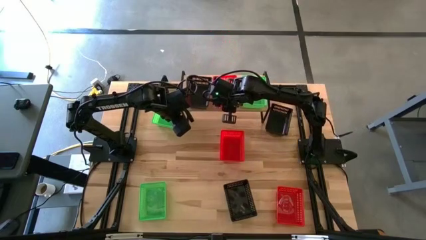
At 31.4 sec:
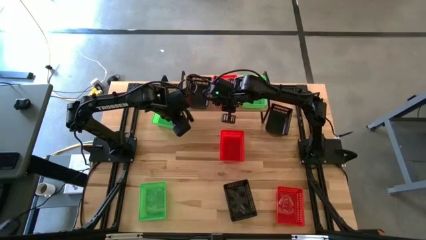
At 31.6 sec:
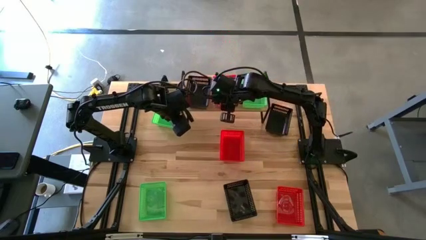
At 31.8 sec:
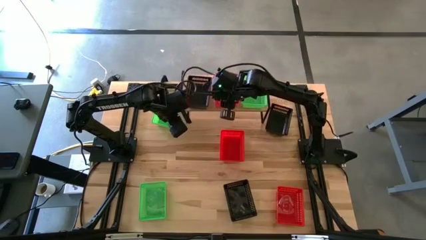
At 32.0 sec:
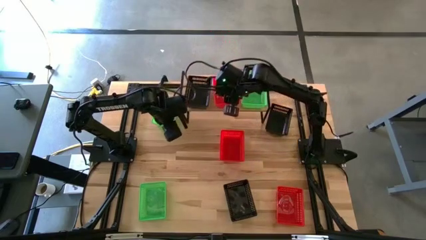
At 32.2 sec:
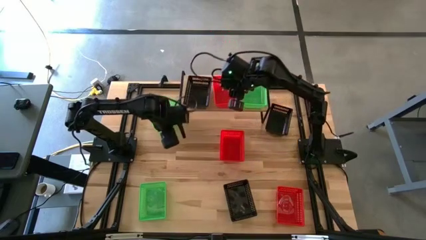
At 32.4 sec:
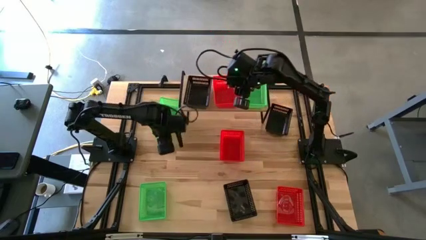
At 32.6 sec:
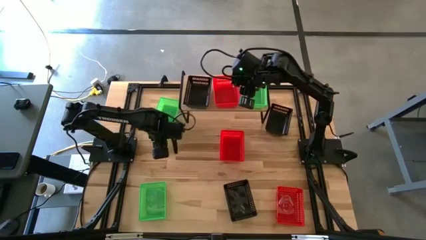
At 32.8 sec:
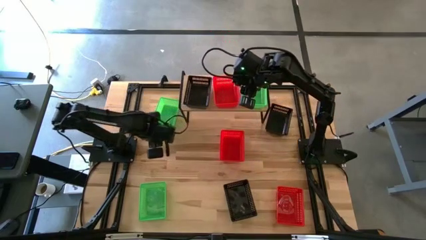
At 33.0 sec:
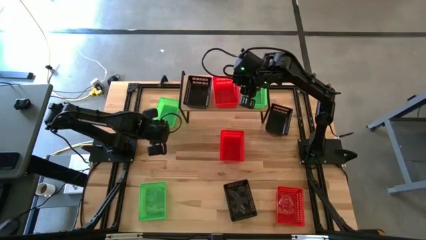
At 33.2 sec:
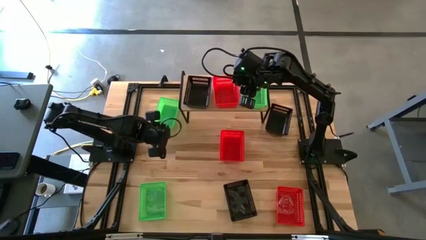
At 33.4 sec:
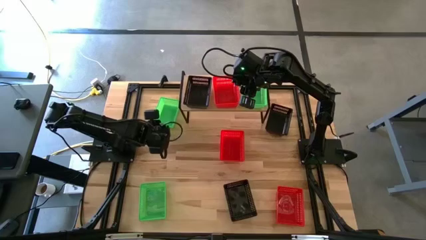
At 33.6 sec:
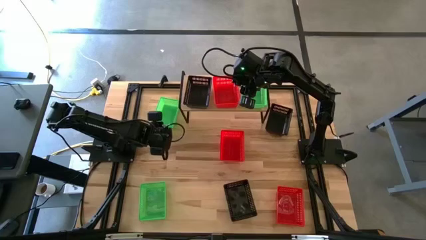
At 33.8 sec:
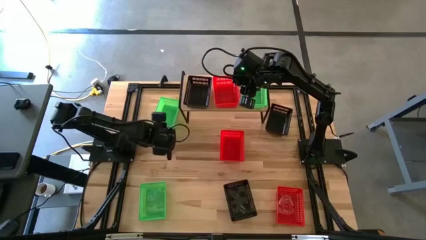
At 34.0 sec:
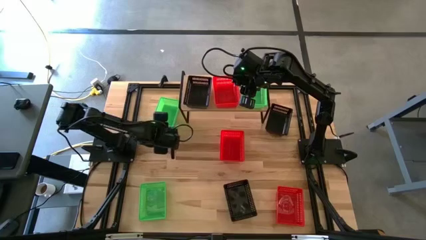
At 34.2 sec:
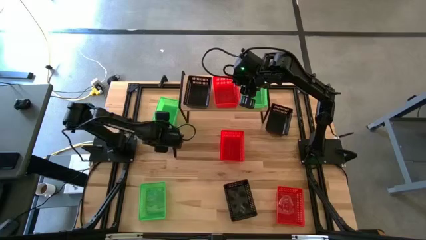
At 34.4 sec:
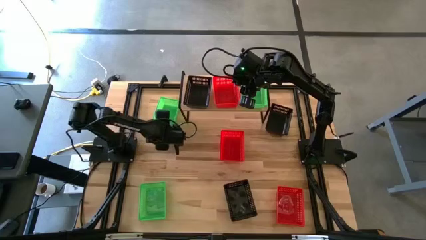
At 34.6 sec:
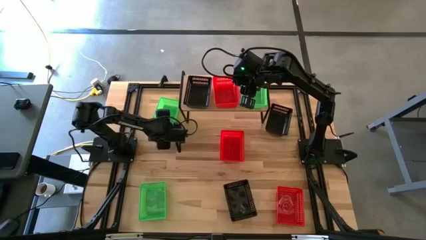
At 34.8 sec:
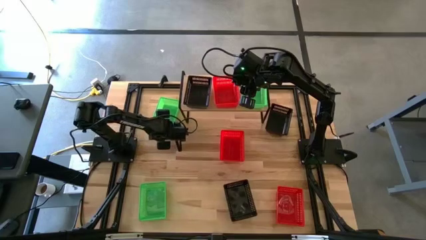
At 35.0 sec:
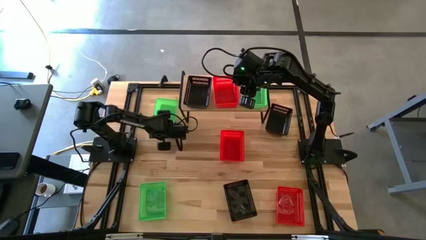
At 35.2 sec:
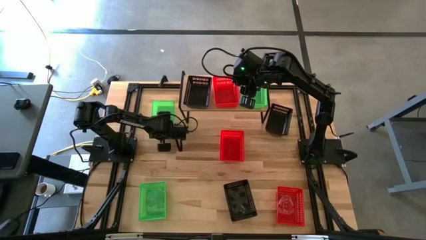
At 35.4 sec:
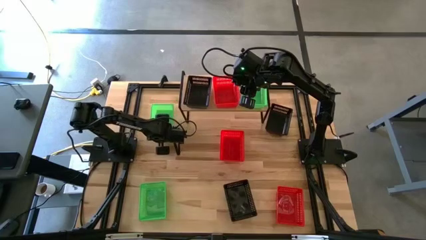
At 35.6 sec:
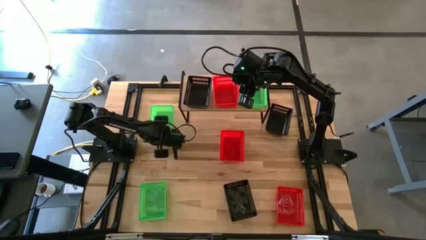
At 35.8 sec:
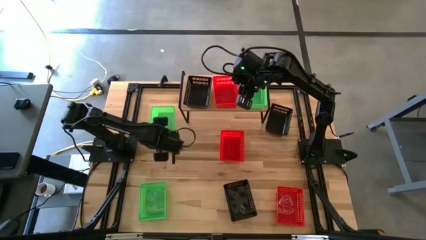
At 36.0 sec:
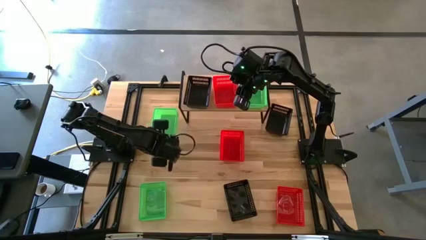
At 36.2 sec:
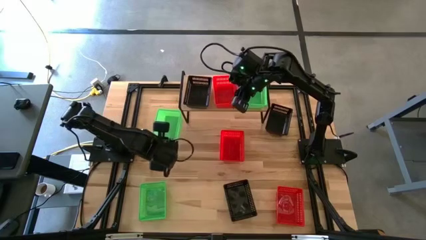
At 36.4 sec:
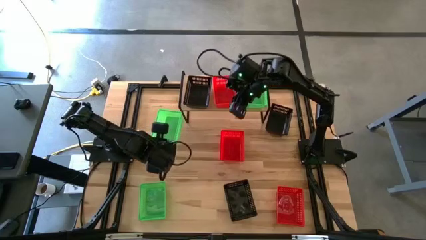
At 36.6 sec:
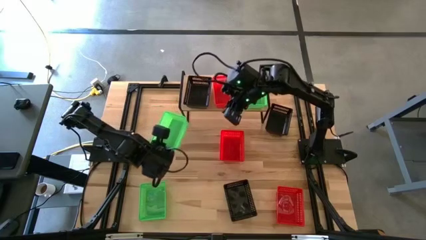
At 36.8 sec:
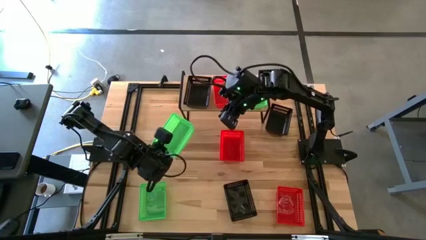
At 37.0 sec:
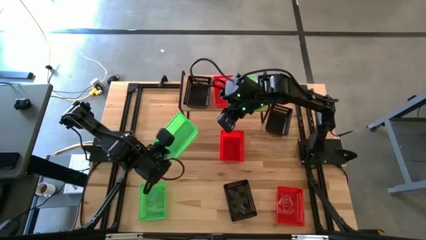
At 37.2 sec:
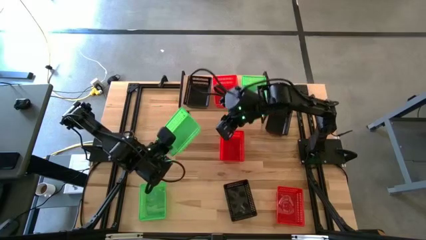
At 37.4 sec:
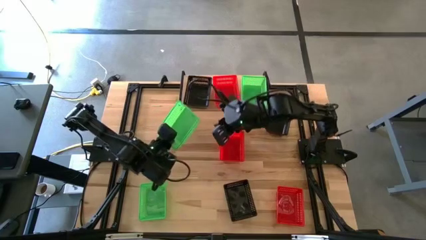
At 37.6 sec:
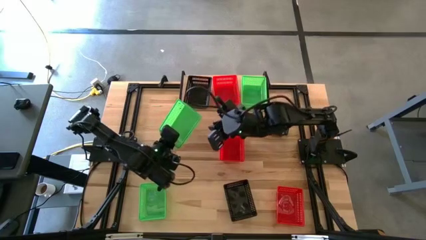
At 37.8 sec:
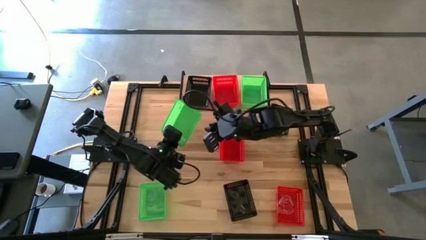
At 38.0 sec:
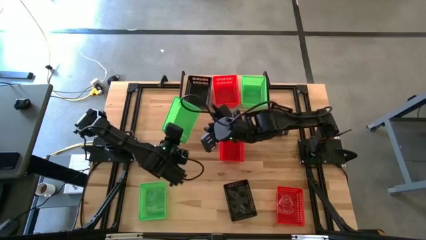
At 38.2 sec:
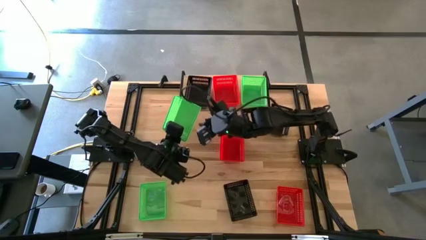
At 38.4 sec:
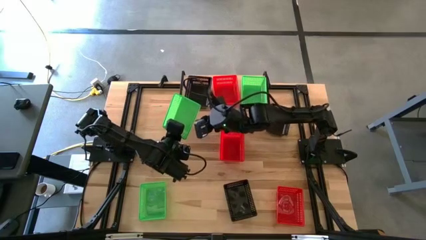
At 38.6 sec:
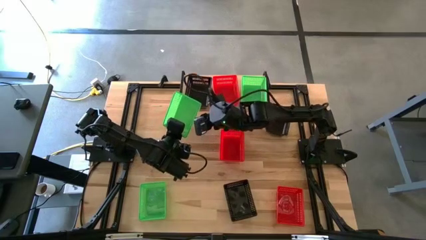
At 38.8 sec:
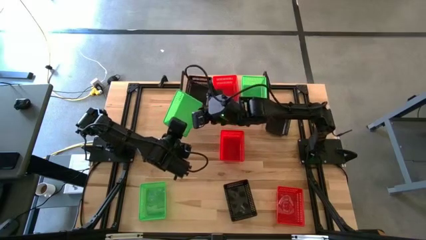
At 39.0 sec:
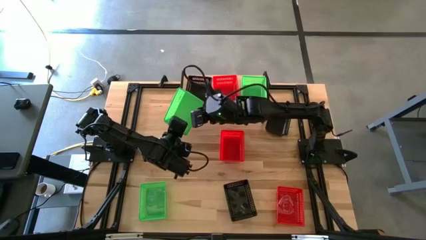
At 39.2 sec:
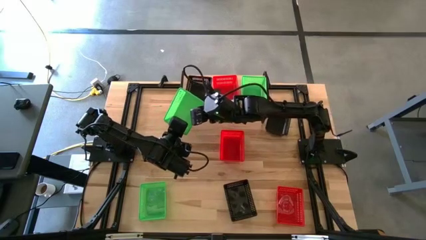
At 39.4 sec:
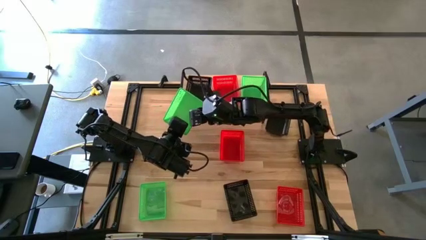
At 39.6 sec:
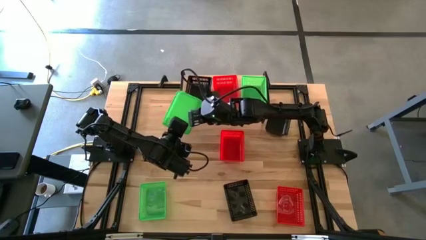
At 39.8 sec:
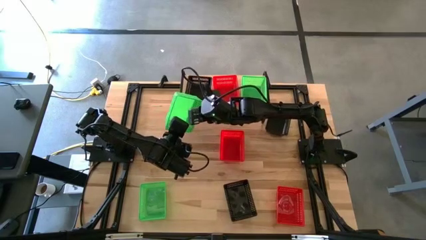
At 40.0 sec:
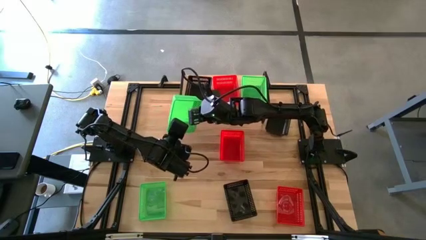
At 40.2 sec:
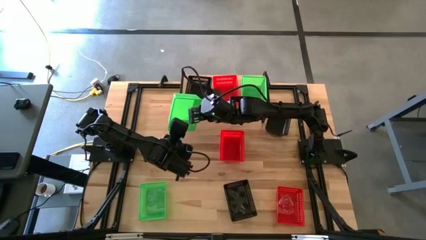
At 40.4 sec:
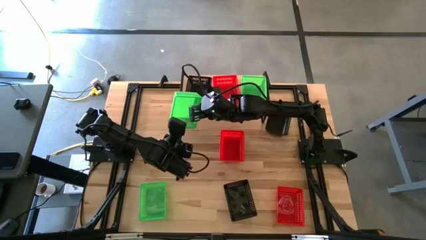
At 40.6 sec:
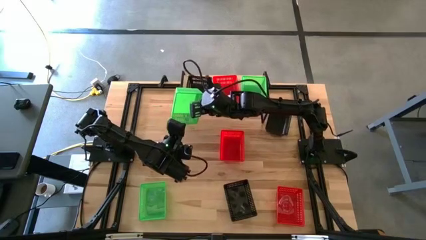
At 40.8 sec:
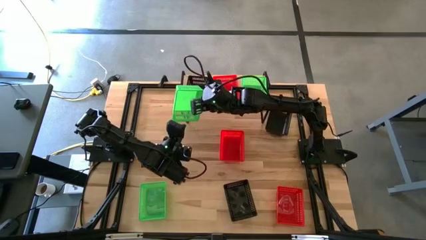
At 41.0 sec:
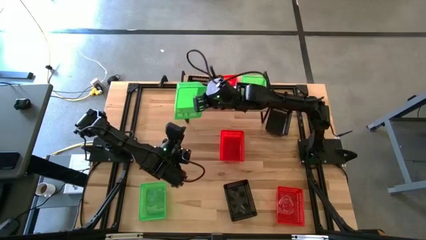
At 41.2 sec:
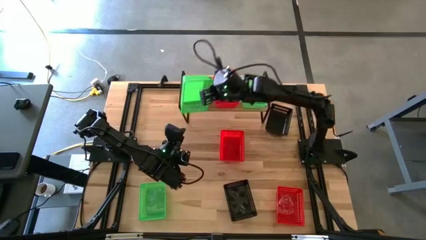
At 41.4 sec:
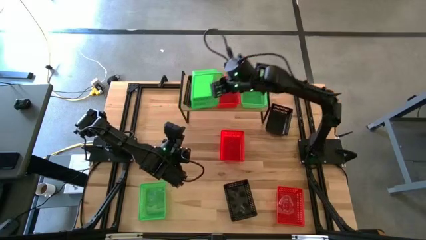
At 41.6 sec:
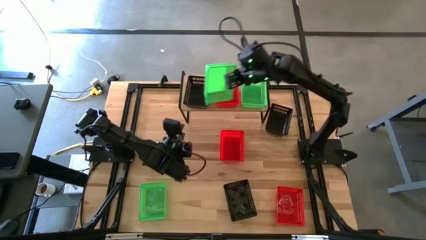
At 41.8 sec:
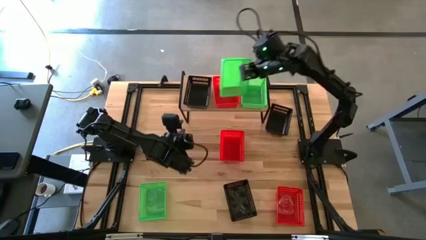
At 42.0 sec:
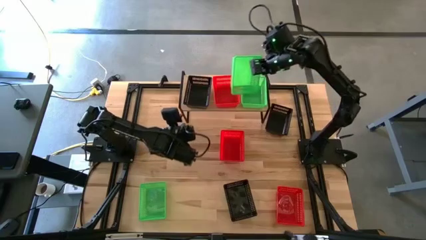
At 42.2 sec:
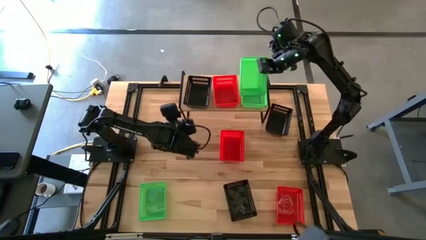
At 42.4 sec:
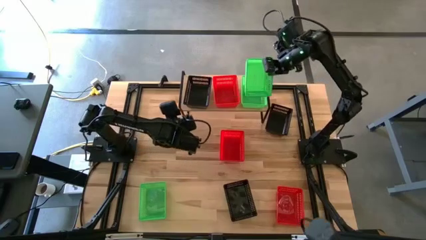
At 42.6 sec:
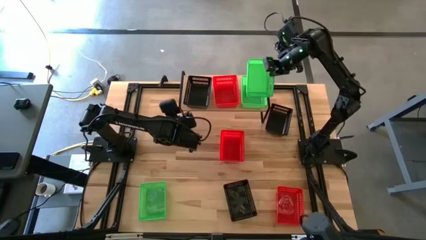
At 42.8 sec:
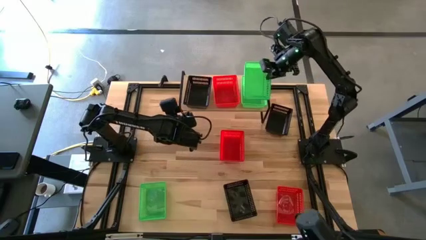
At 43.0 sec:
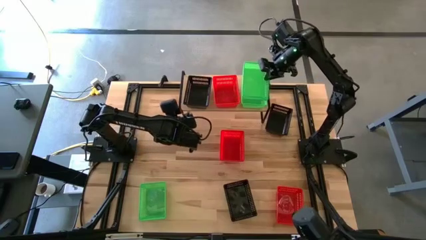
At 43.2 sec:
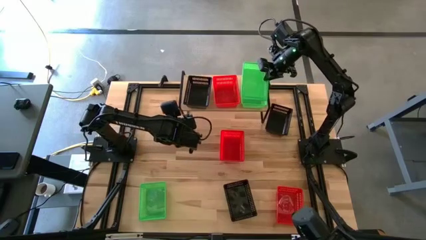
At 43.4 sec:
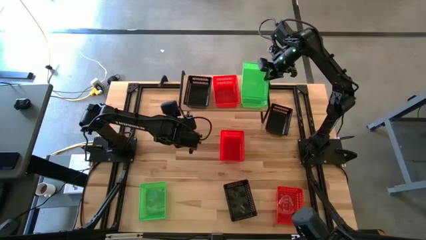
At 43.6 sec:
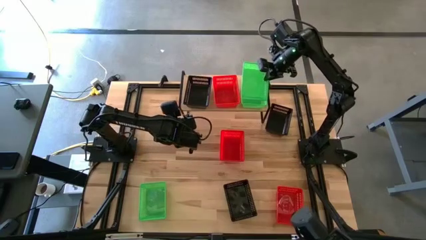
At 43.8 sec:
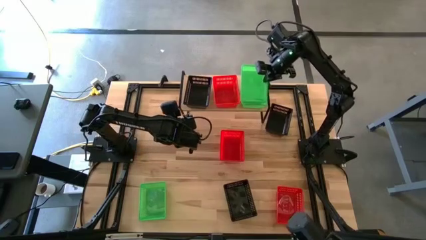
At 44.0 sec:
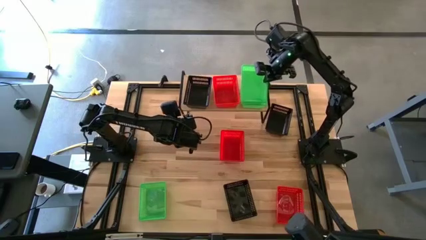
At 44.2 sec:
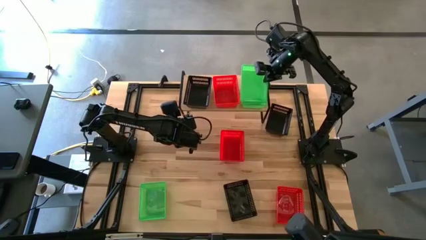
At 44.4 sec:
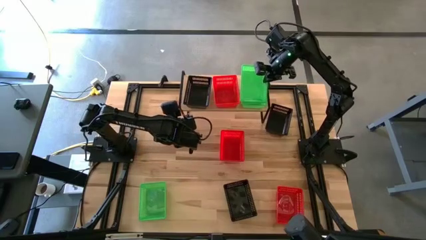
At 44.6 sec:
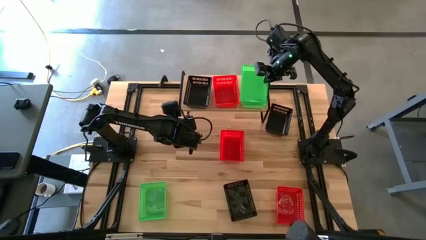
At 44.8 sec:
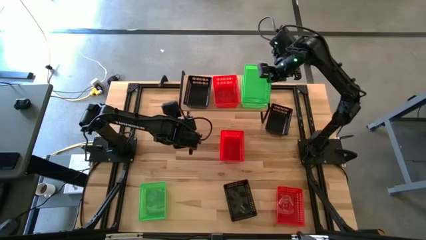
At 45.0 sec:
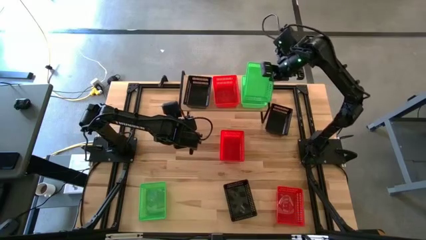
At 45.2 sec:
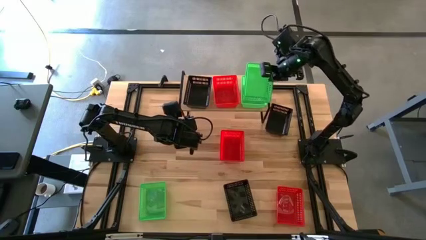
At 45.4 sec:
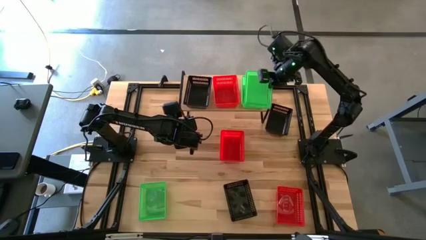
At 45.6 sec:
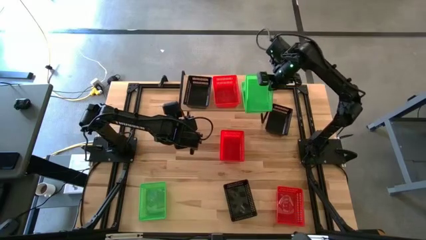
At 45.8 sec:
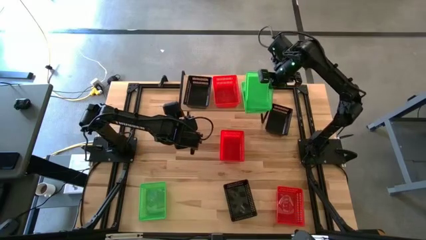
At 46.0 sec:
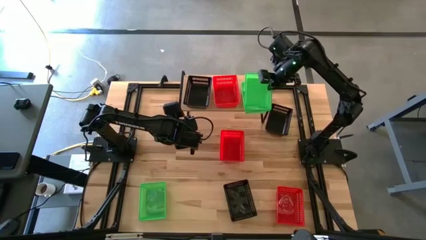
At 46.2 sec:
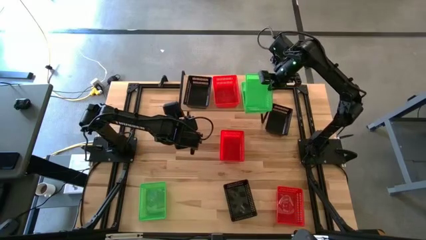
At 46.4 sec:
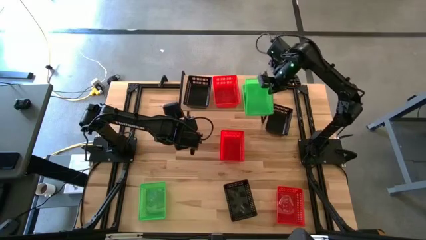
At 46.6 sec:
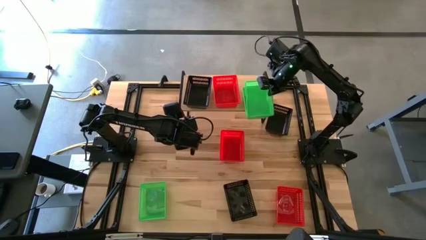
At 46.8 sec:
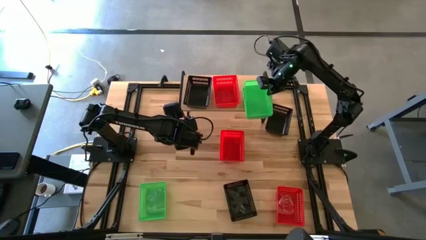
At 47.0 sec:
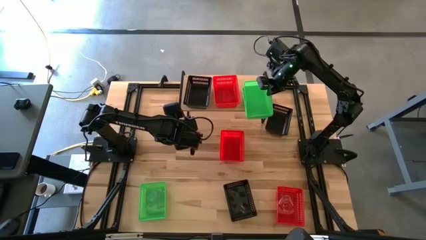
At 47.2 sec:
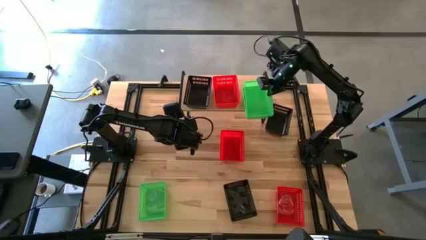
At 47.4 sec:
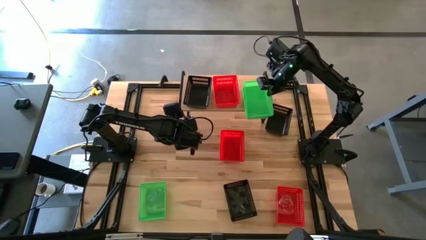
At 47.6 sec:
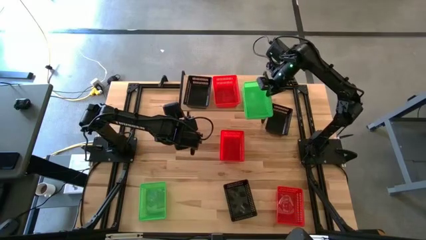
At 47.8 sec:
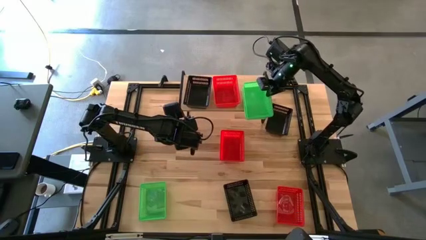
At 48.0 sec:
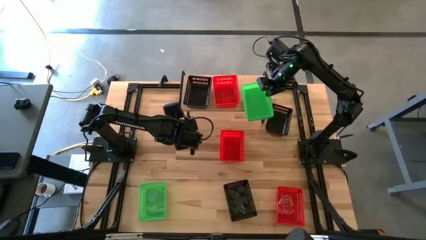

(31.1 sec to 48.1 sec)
Task: Stack baskets on shelf by color
Stack the top green bin on the green bin on the shelf
